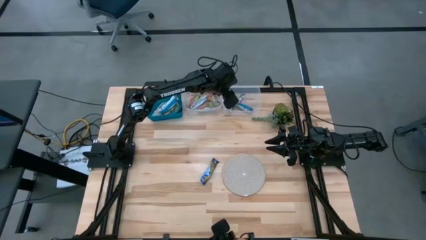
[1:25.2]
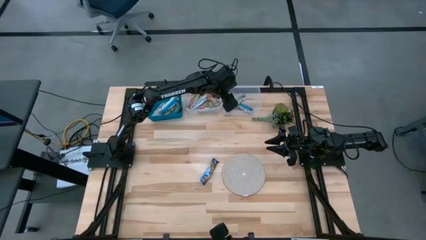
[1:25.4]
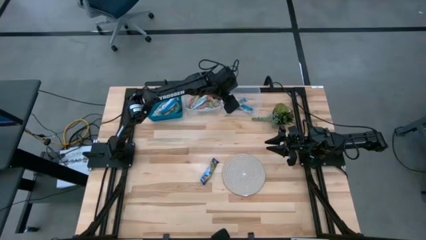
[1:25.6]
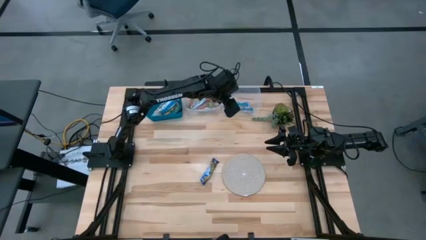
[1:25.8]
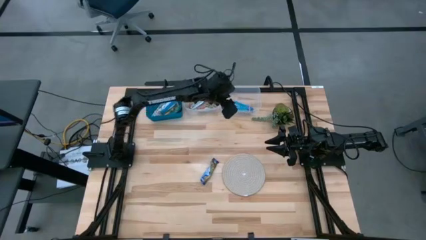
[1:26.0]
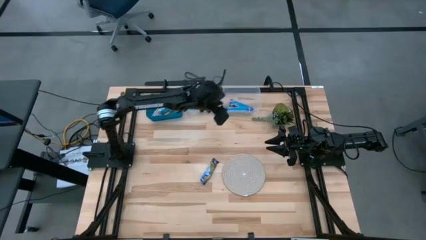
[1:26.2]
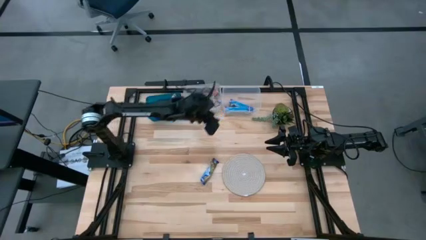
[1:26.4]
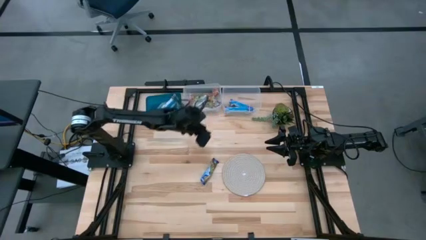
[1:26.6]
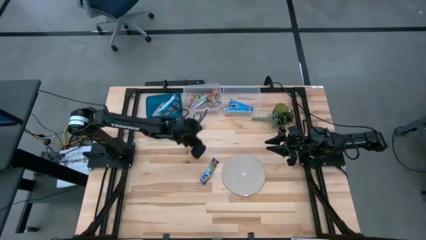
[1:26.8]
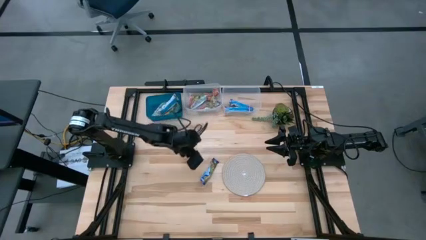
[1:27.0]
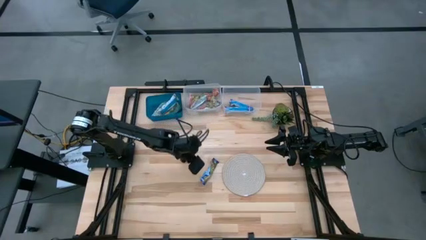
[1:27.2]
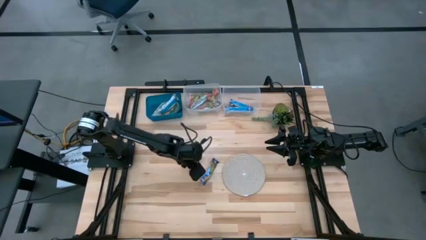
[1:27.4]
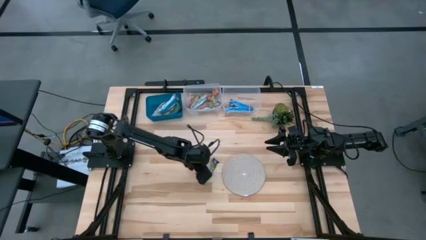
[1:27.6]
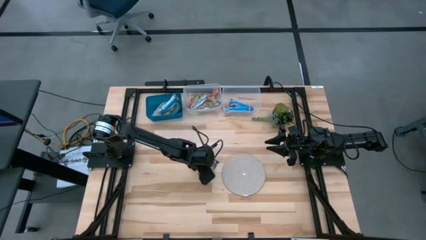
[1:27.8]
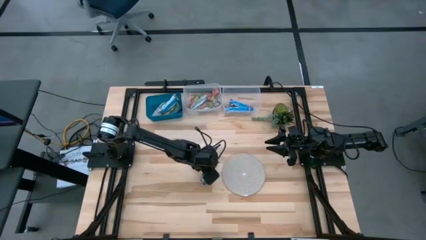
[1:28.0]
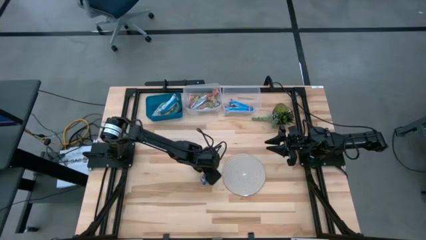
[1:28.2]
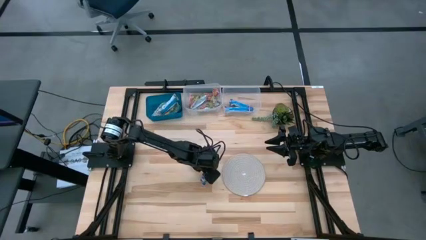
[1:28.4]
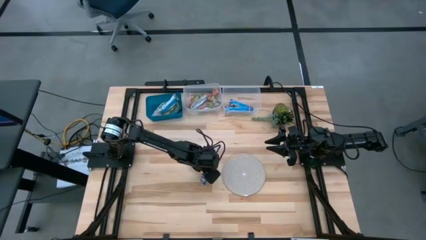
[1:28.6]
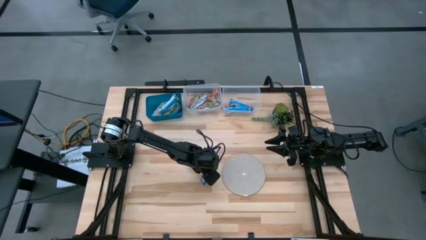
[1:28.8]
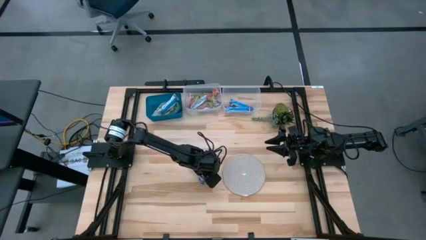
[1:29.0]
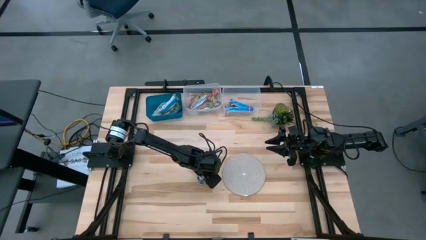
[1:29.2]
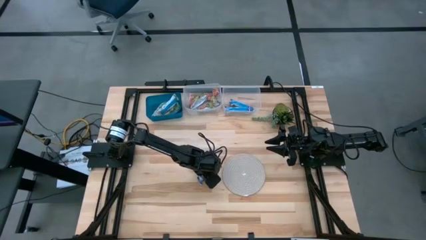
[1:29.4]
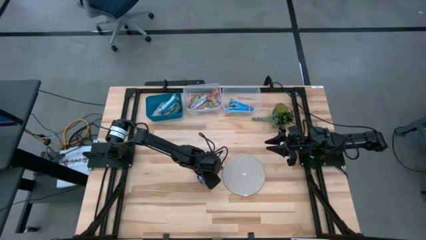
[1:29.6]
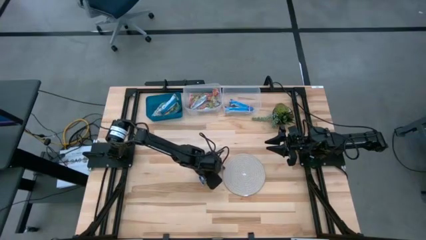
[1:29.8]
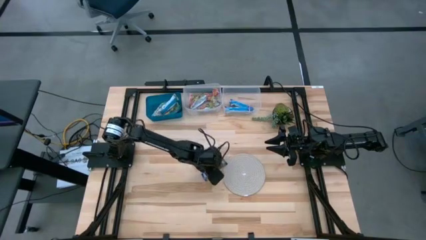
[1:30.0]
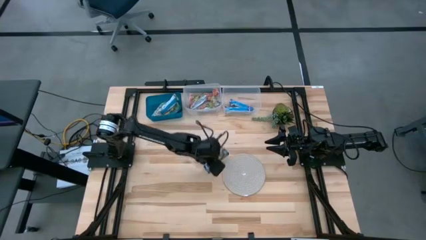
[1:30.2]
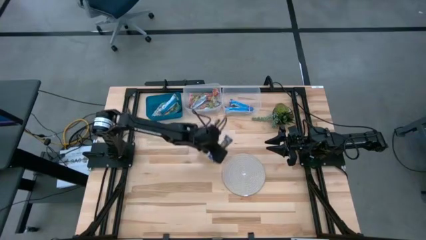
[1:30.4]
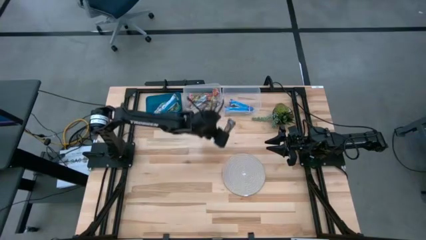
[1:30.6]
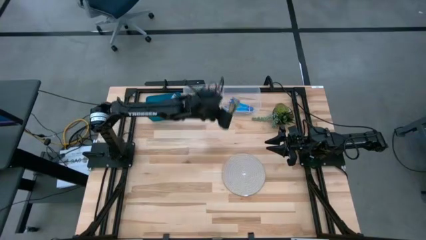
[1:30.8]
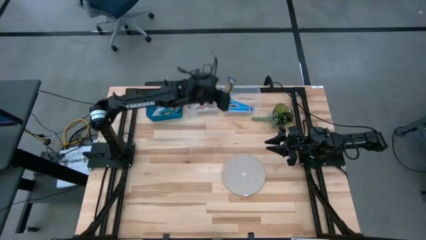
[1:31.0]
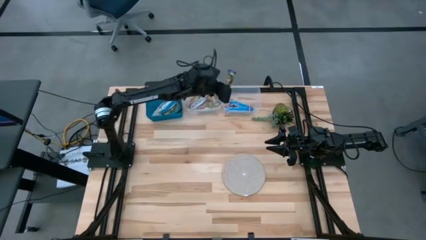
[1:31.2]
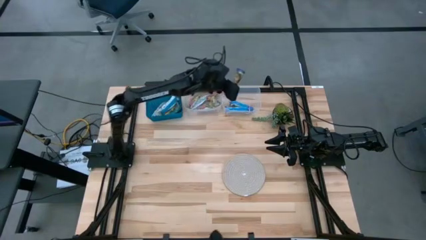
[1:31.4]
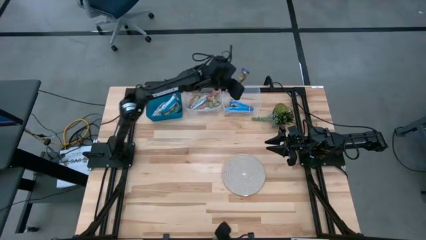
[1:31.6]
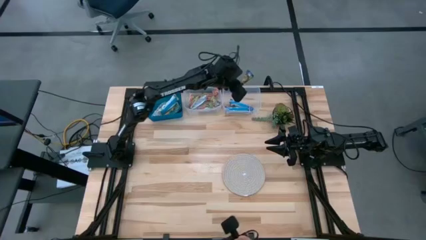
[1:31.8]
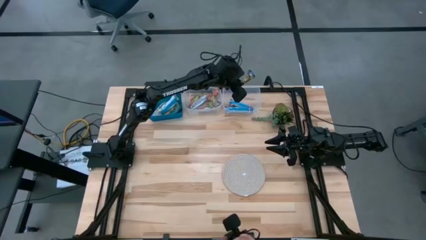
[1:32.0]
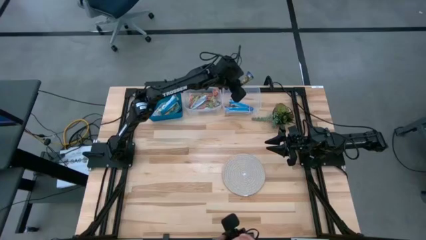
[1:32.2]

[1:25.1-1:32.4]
Task: Pick and place Granola Bars by type
Put the blue granola bar into the right transparent bin

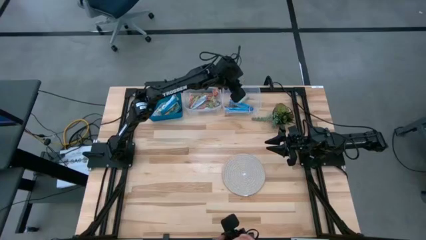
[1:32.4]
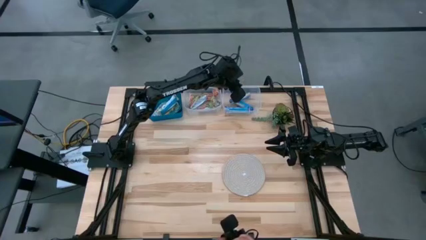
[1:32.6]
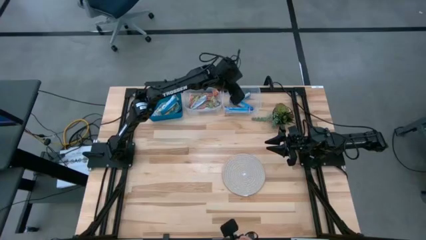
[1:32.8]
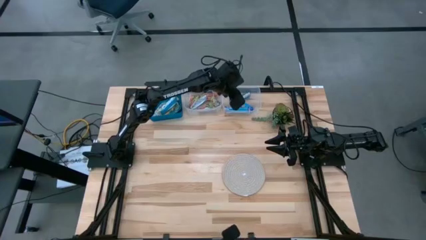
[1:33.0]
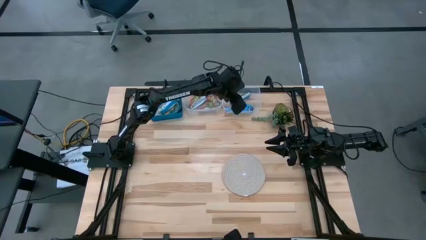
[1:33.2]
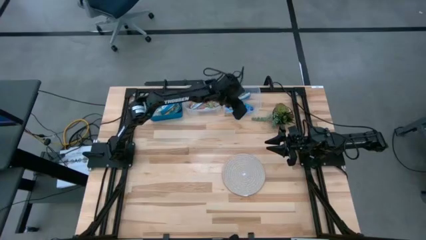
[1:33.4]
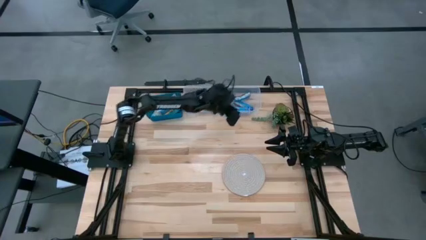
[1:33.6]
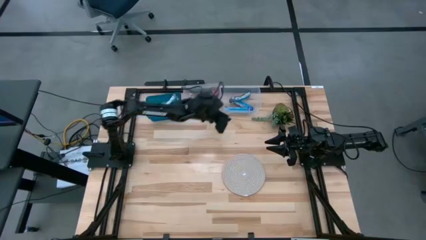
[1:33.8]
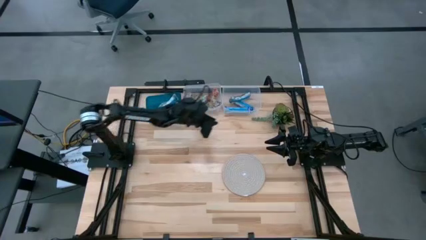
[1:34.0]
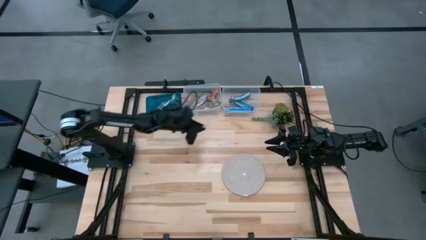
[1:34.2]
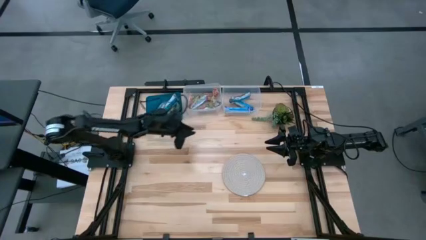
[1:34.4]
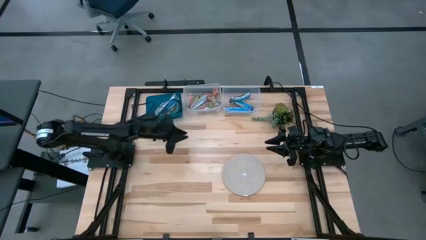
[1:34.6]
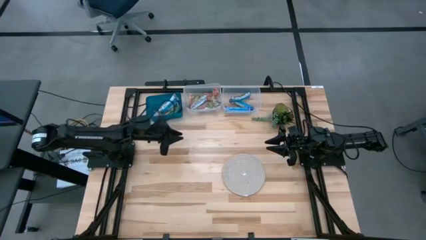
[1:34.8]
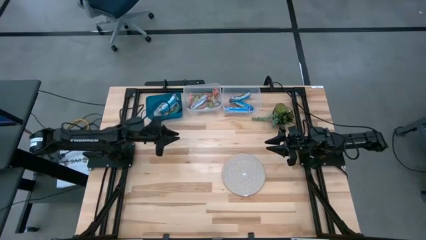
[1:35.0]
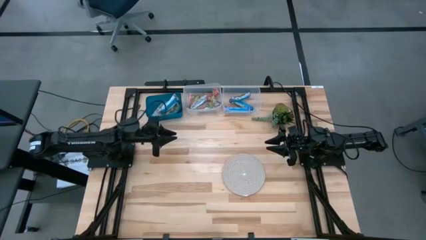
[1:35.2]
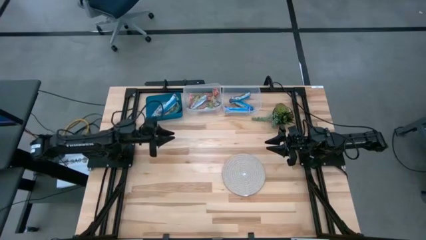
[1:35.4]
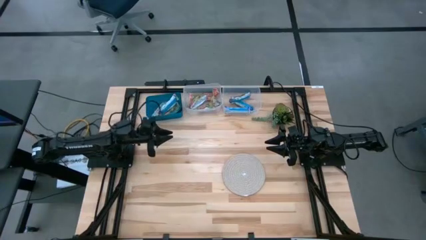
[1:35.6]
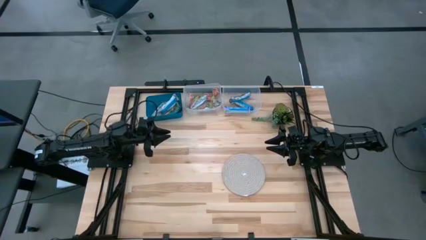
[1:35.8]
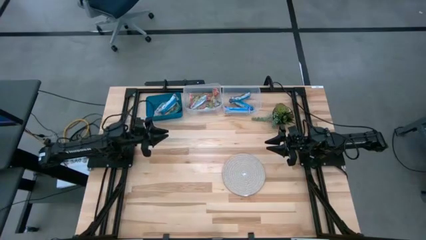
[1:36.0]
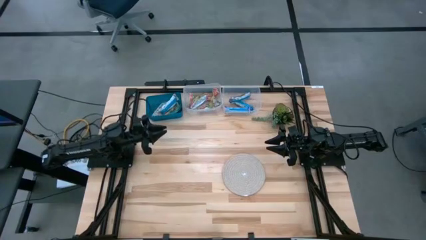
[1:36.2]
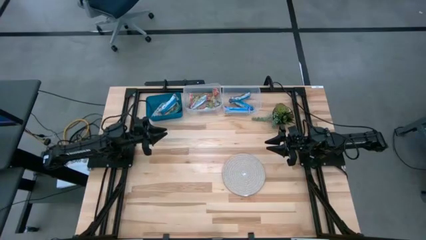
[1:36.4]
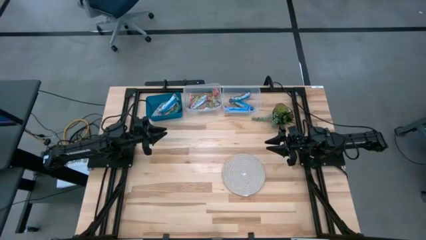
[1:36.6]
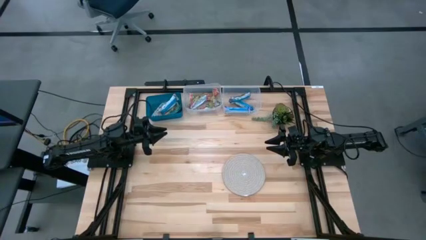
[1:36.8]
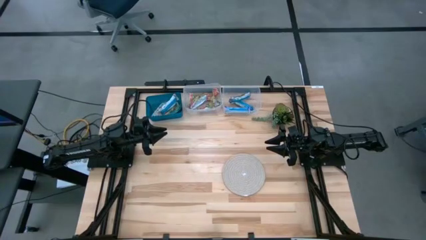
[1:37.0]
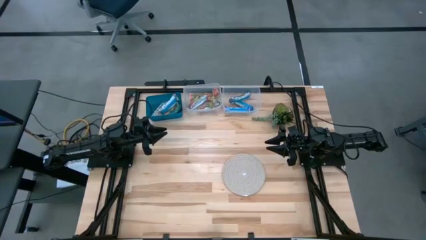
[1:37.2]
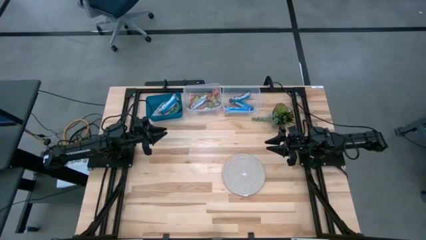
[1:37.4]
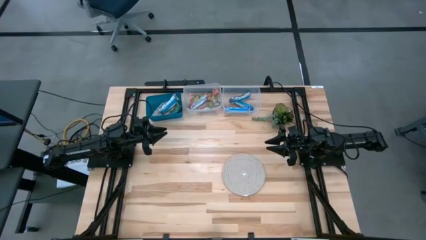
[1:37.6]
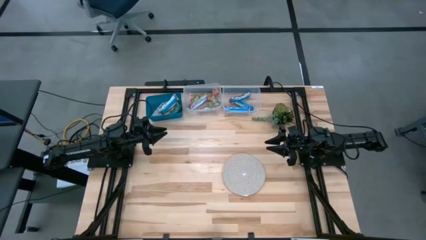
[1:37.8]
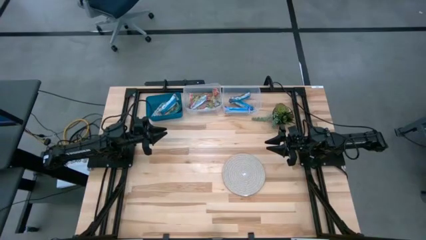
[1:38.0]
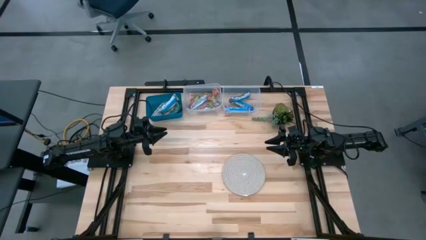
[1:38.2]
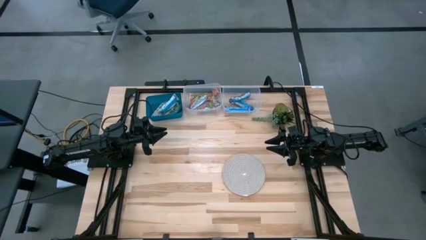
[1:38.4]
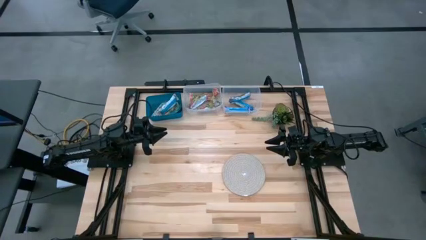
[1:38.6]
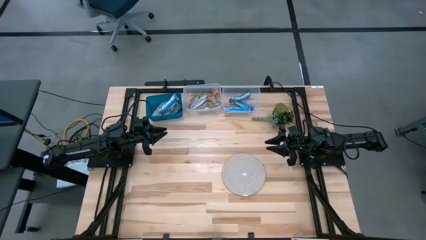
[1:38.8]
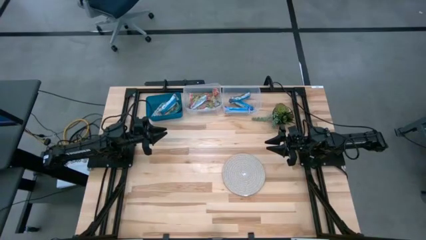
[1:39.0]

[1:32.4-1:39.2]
Return to Home Position

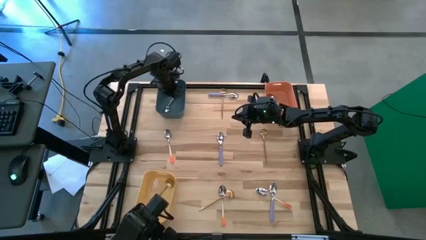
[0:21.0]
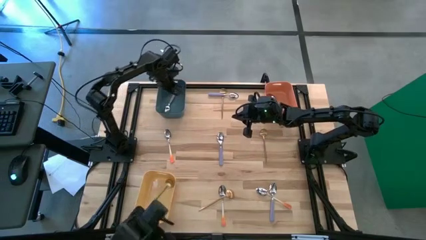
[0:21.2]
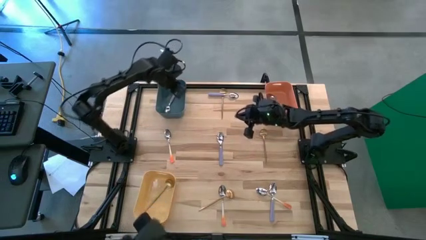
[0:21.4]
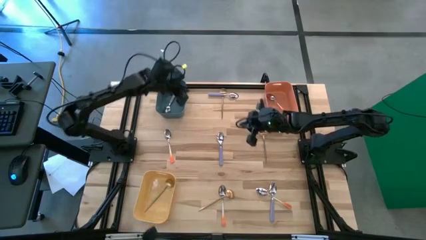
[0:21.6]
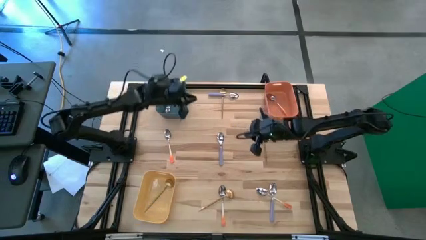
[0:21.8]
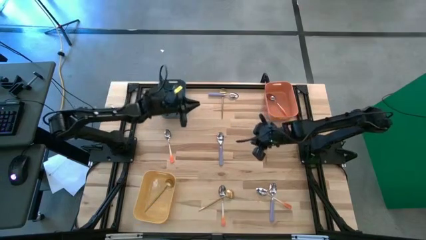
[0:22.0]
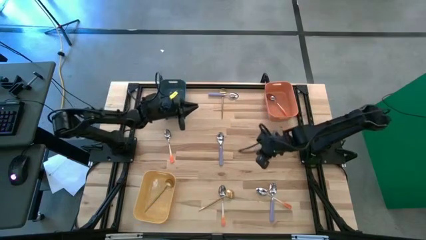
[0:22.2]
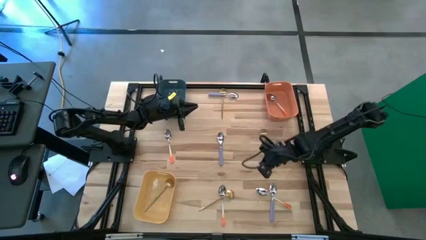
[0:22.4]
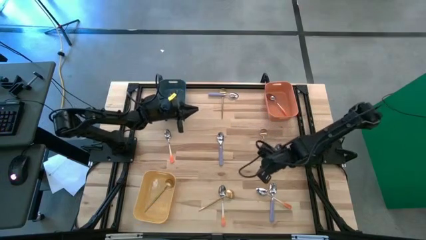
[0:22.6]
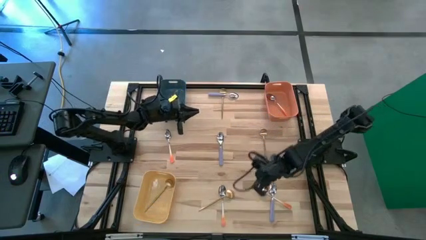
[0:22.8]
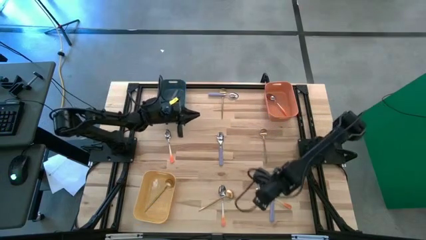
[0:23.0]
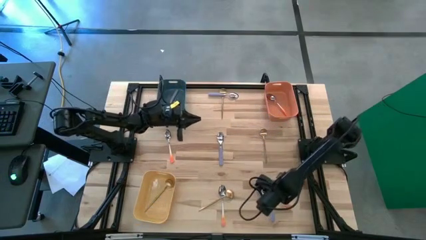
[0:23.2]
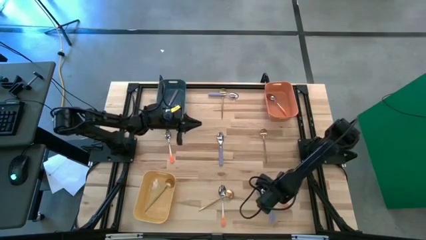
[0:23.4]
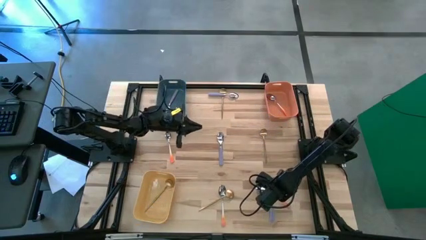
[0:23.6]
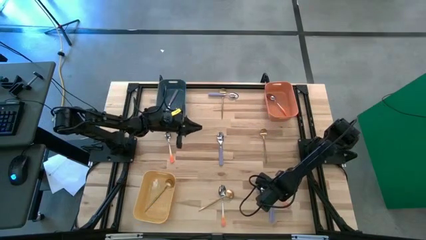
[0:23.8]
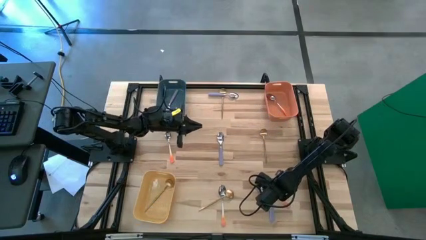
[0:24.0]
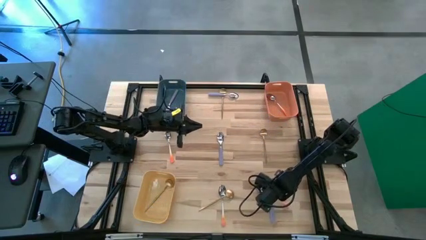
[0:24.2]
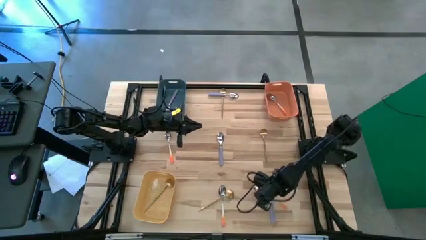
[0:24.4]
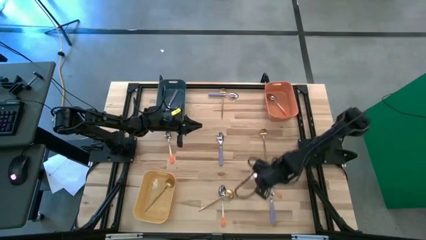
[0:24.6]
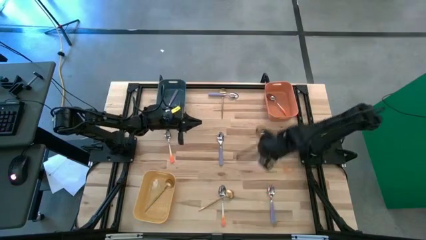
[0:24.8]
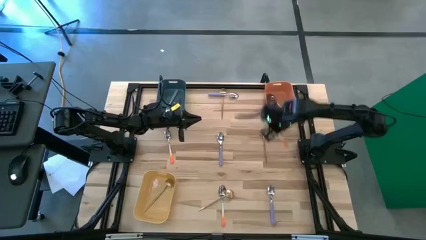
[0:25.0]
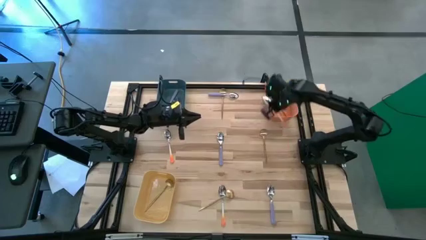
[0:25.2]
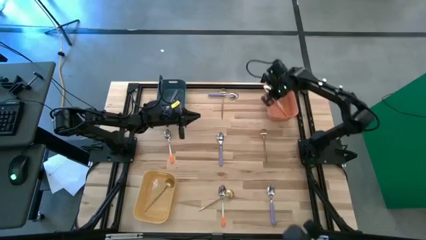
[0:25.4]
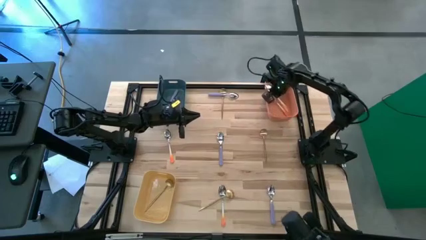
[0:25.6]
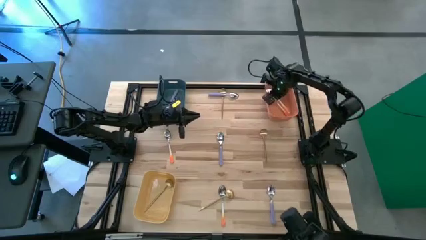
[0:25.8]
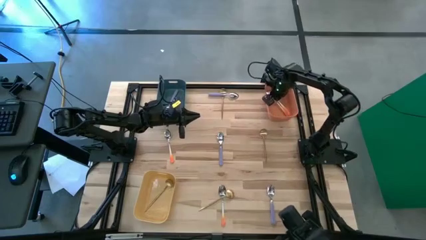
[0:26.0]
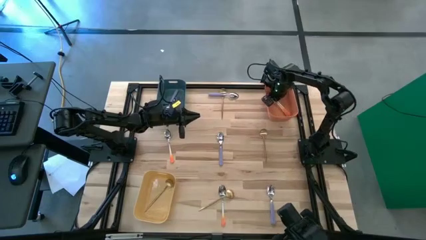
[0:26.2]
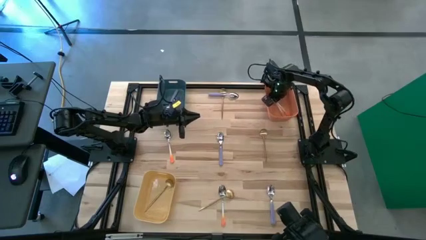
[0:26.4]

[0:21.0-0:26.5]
Task: Sort silverware by color (type)
Put the bottom right orange spoon into the orange bin
